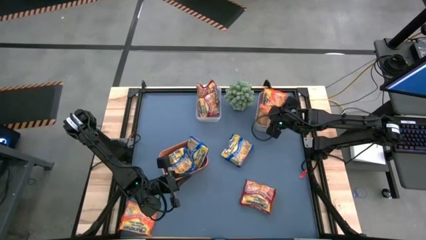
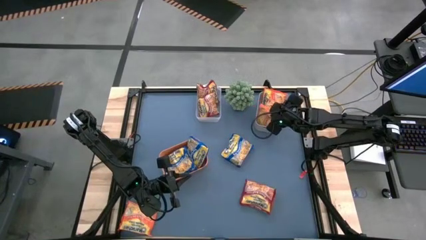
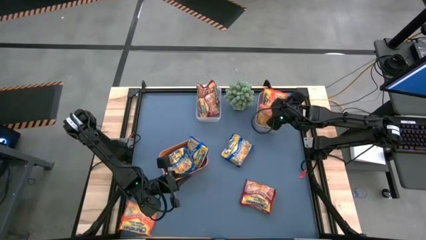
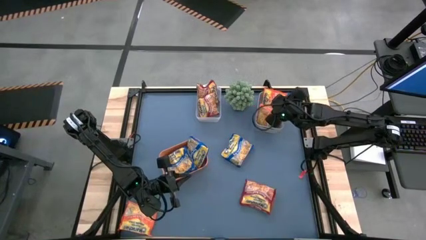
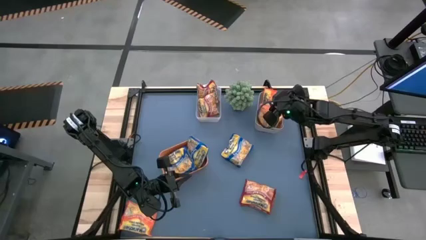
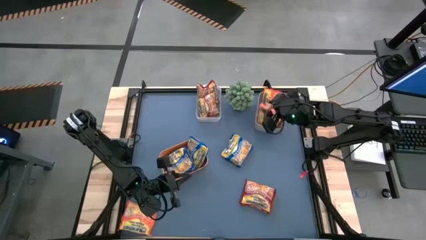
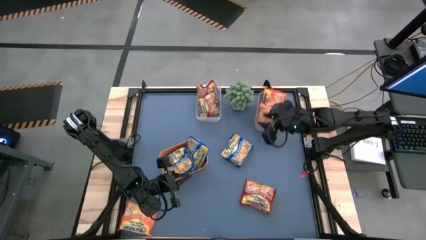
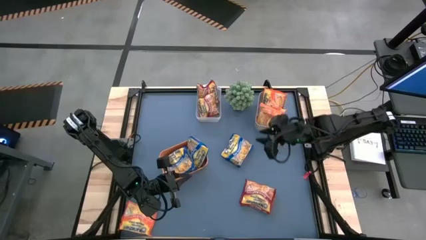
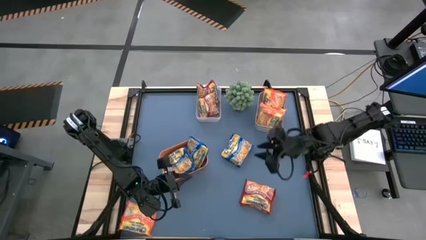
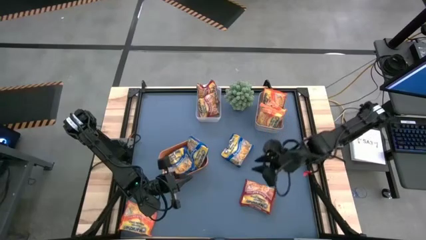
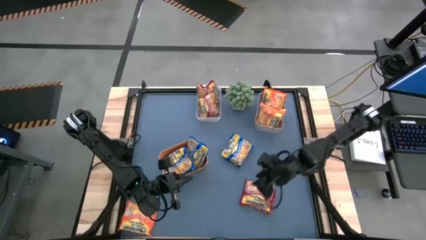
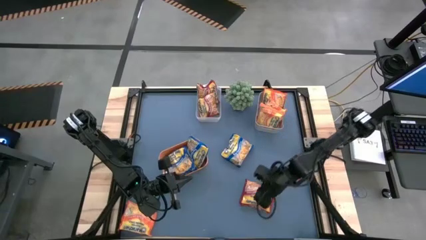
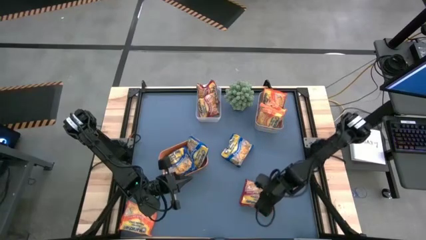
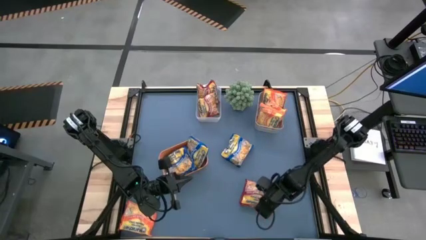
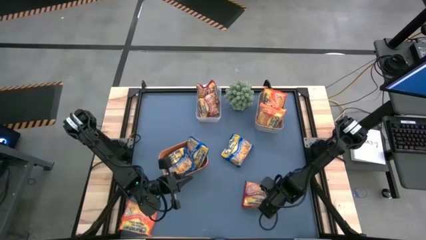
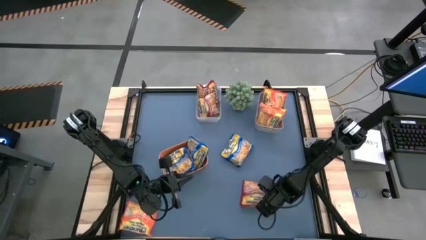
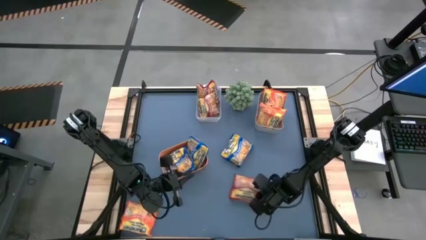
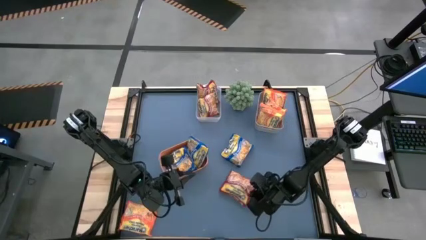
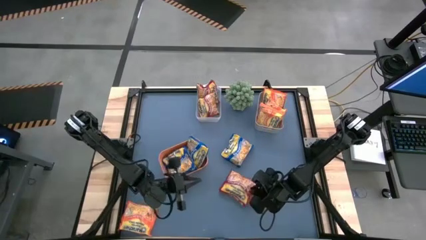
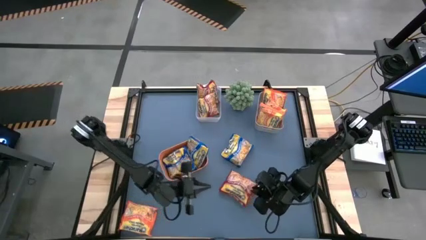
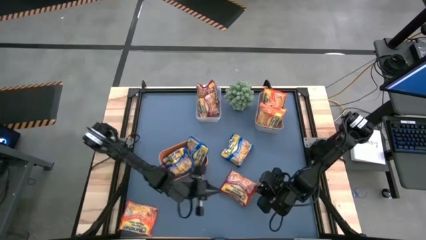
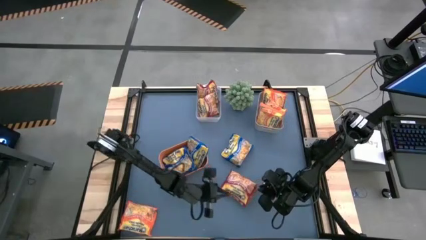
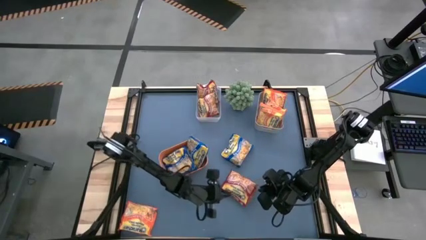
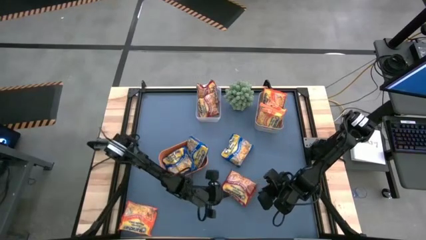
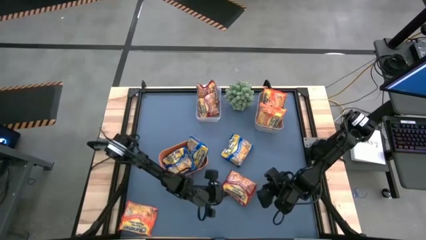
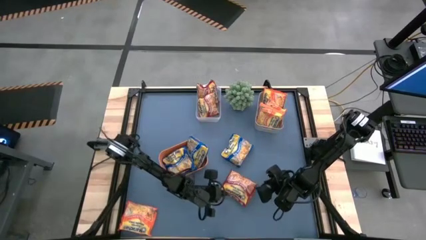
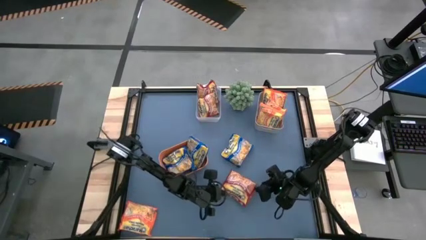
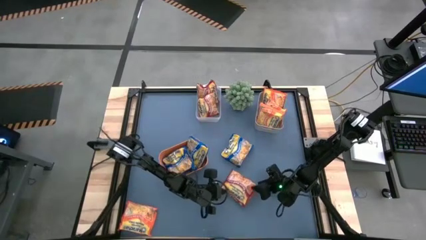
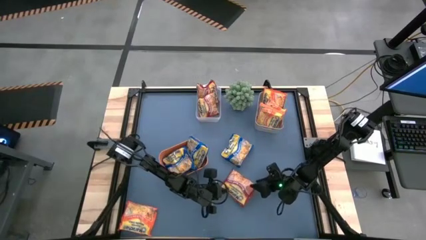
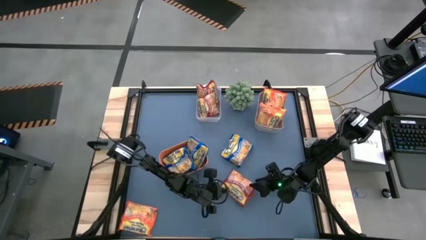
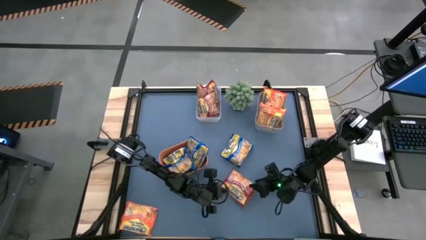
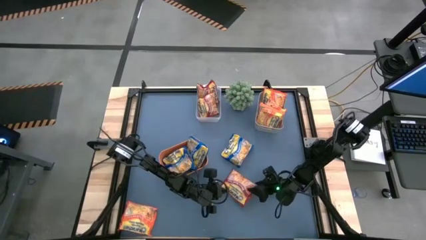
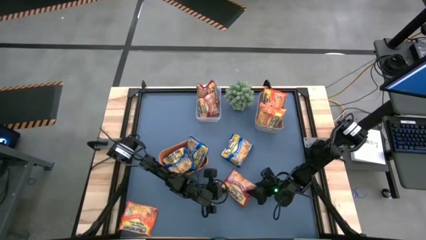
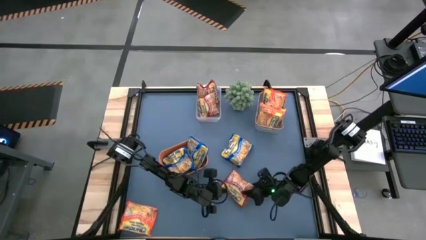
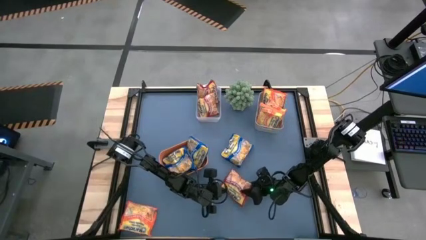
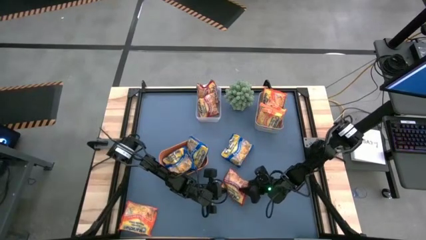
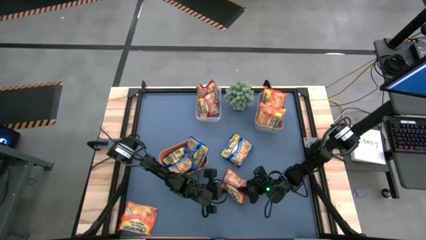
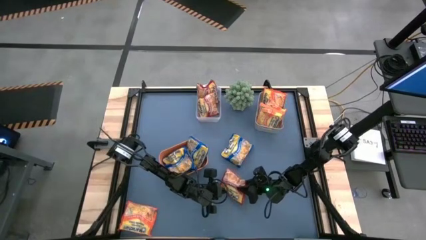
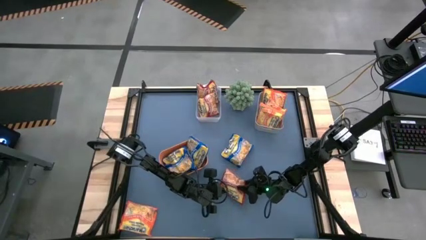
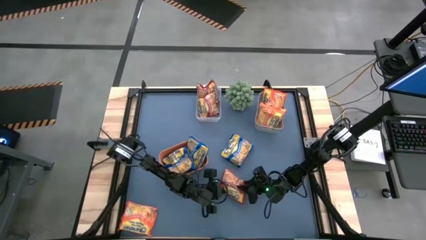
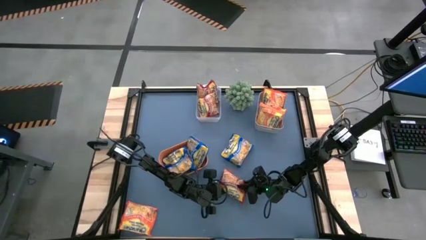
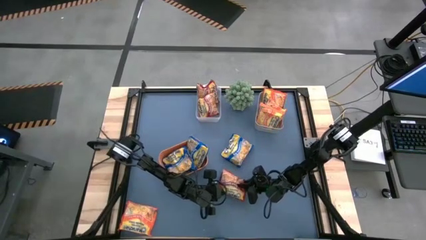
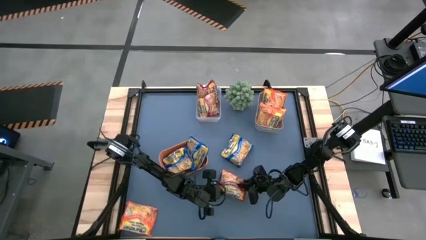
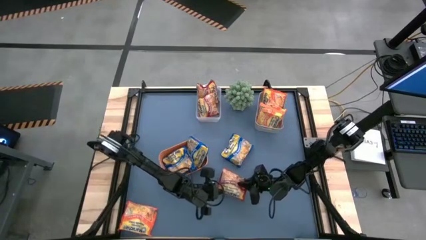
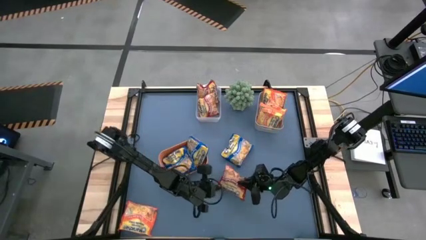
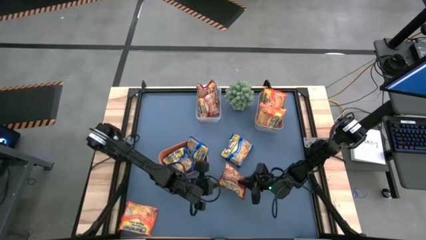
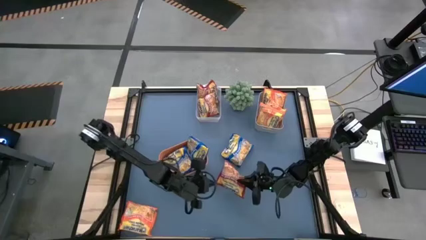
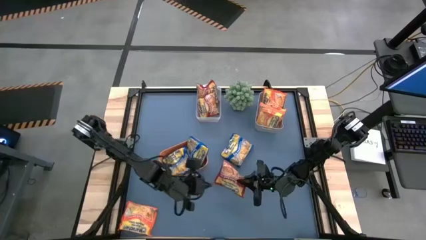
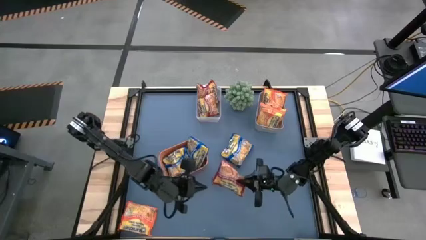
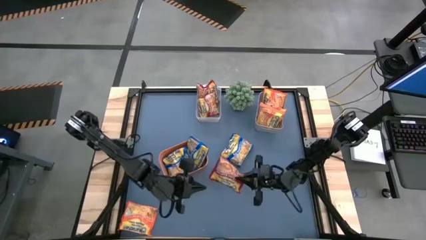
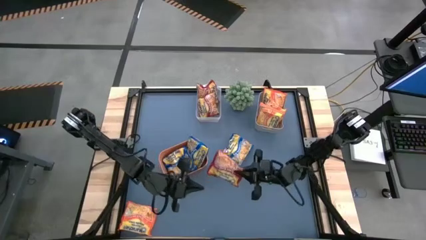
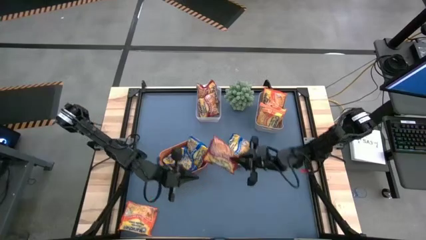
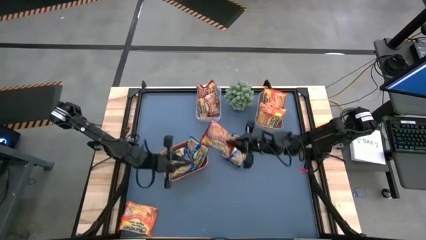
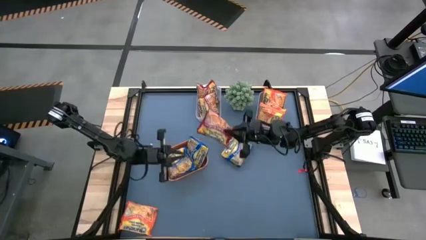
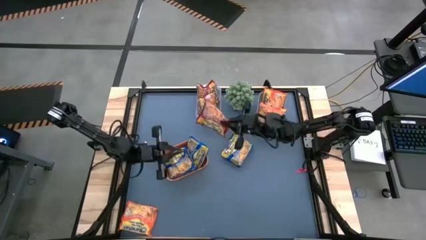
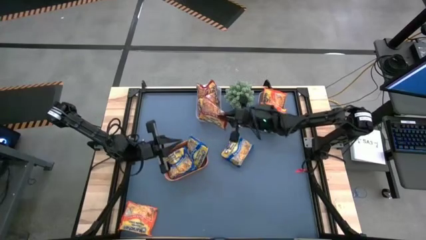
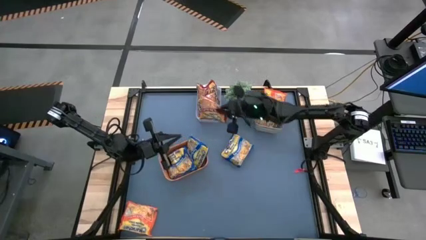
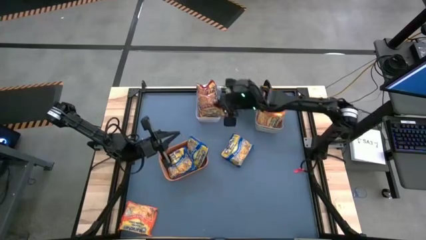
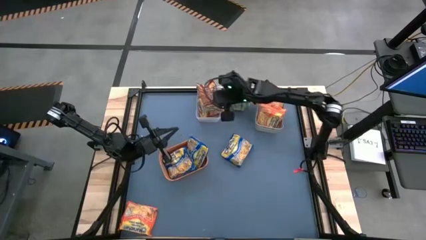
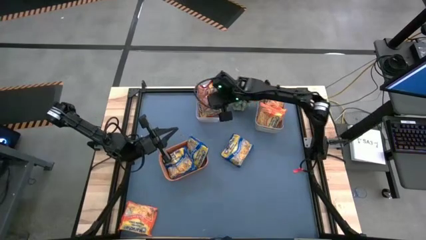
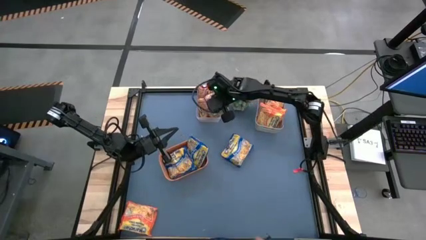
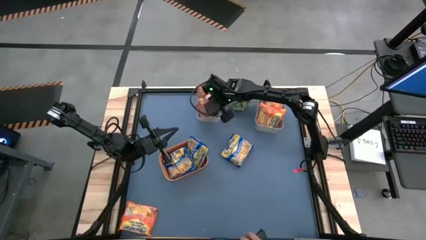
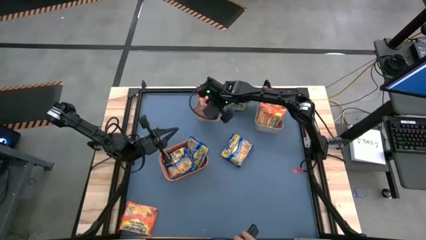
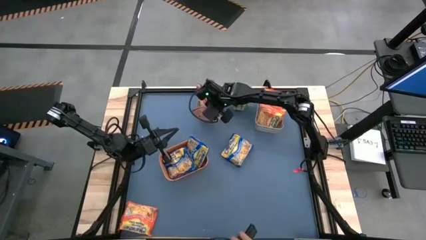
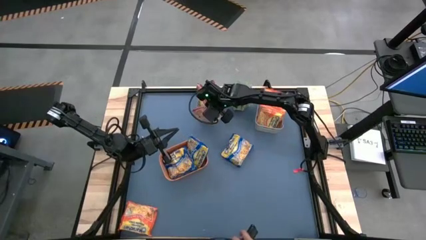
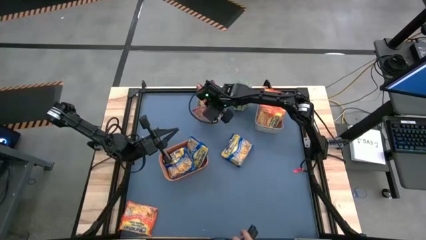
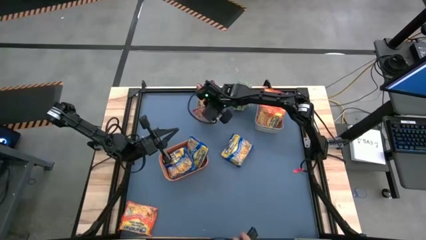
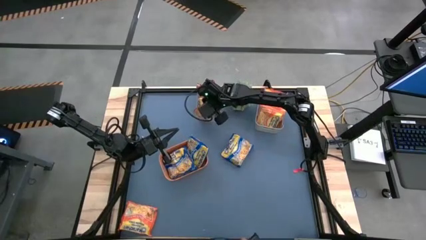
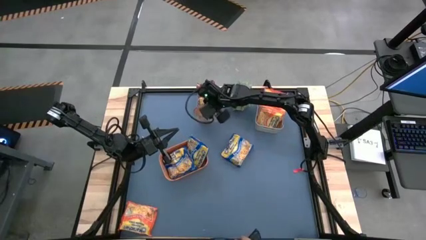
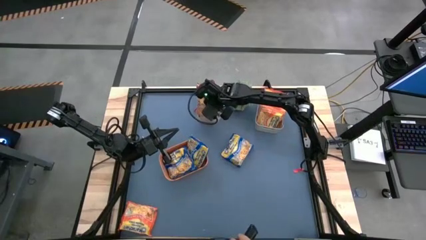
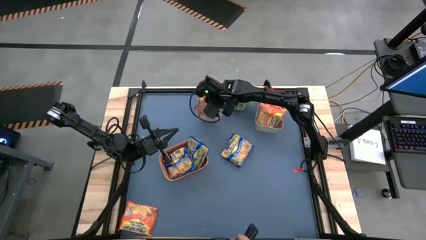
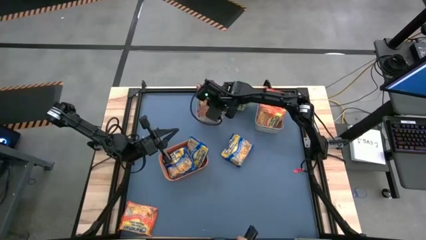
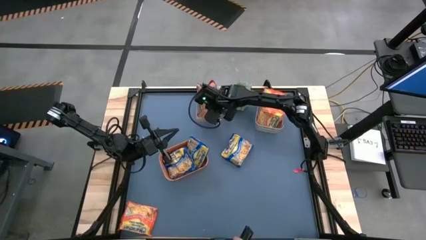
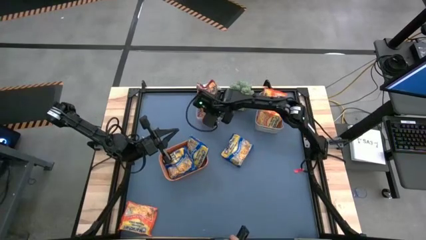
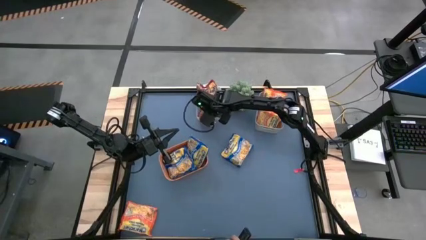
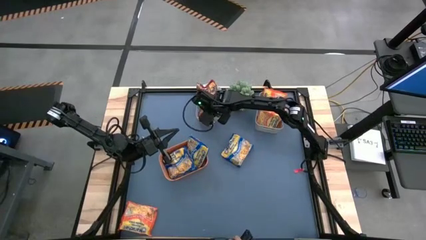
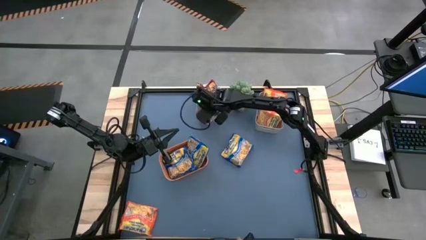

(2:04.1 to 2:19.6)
Task: Sort Maruchan noodles
Put the red noodle pack into the transparent bin
